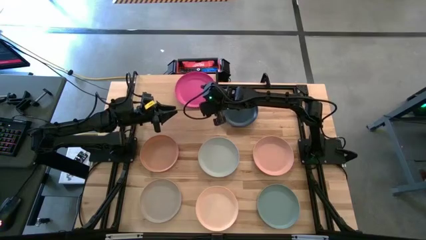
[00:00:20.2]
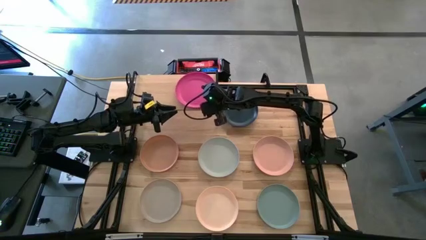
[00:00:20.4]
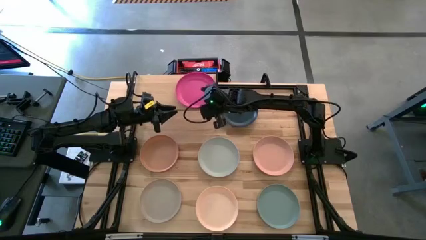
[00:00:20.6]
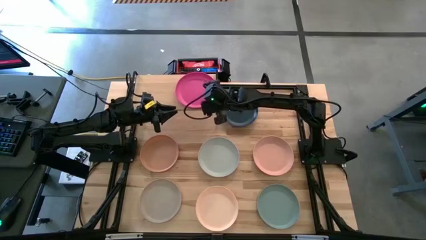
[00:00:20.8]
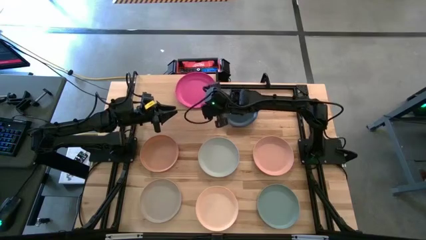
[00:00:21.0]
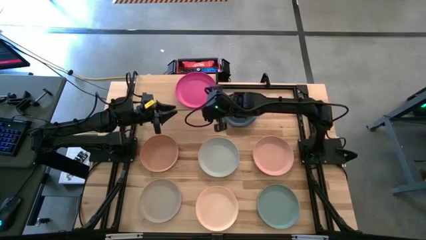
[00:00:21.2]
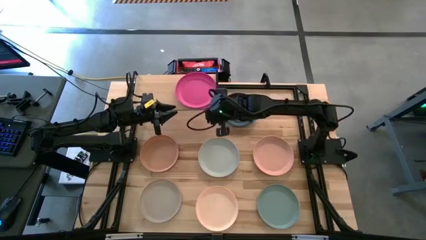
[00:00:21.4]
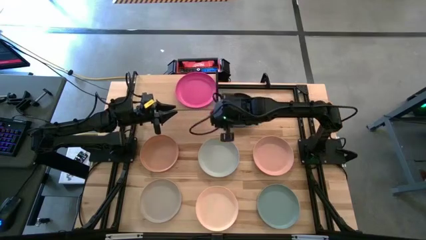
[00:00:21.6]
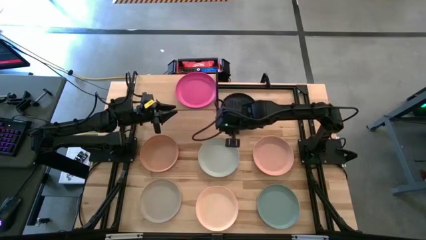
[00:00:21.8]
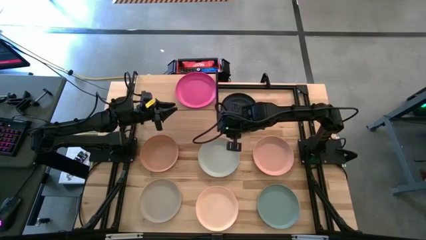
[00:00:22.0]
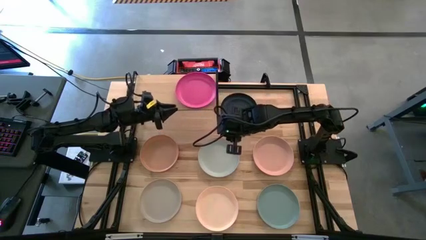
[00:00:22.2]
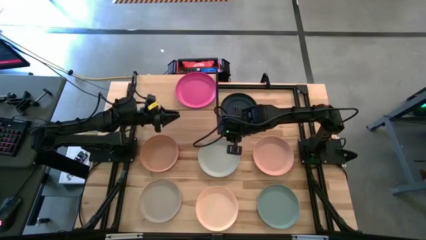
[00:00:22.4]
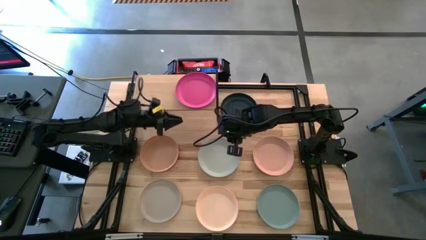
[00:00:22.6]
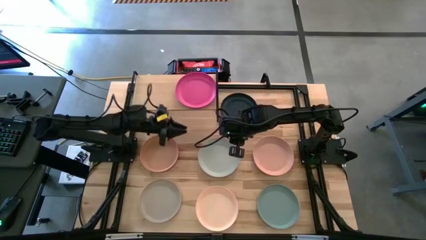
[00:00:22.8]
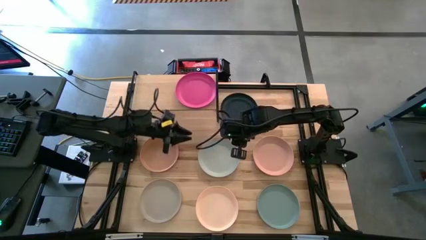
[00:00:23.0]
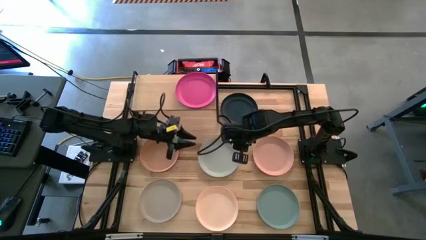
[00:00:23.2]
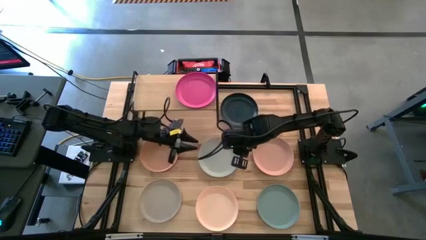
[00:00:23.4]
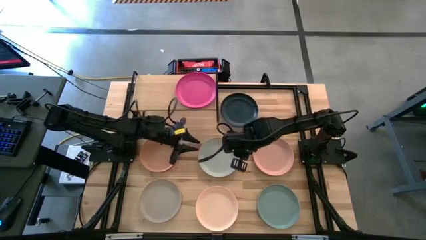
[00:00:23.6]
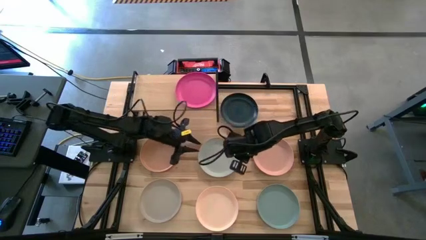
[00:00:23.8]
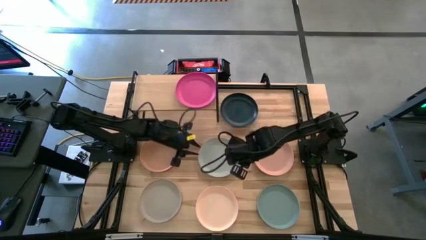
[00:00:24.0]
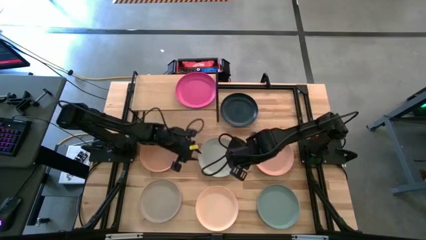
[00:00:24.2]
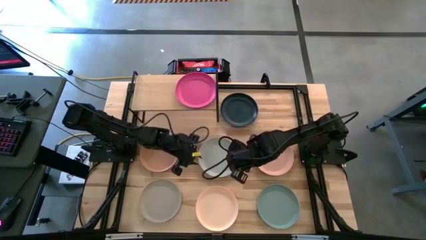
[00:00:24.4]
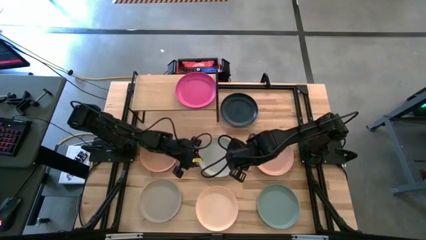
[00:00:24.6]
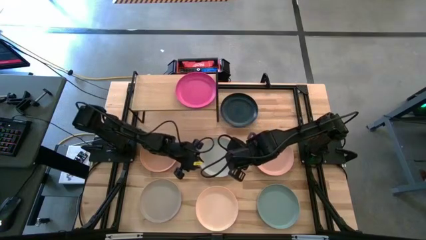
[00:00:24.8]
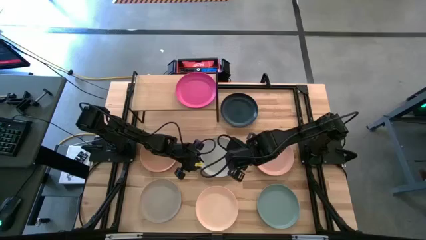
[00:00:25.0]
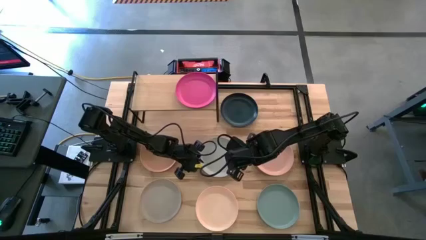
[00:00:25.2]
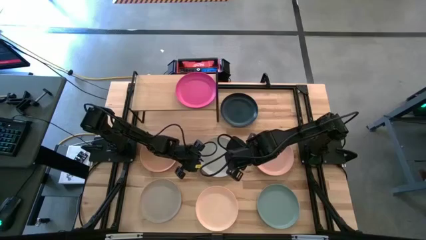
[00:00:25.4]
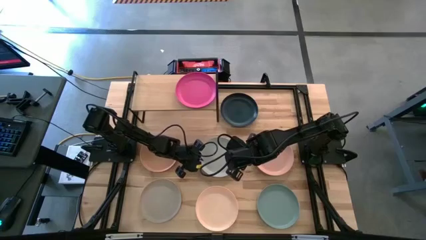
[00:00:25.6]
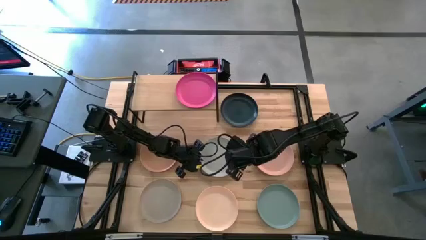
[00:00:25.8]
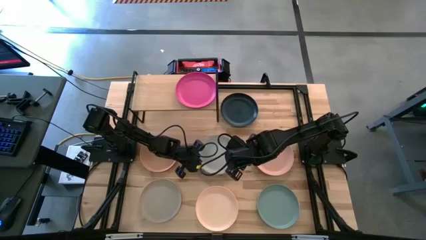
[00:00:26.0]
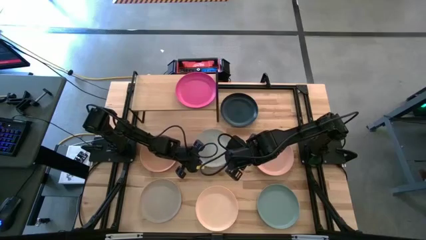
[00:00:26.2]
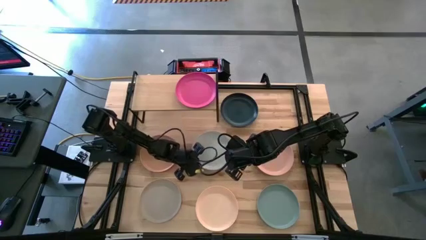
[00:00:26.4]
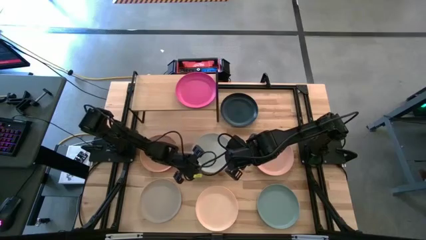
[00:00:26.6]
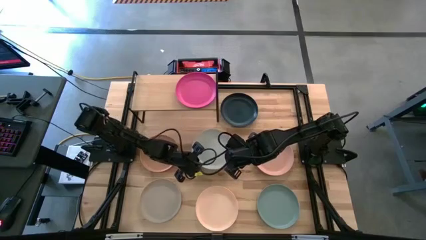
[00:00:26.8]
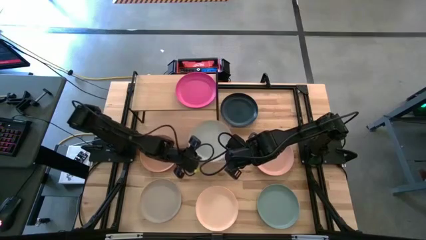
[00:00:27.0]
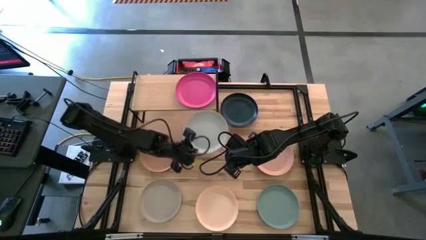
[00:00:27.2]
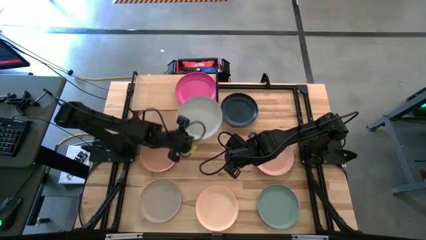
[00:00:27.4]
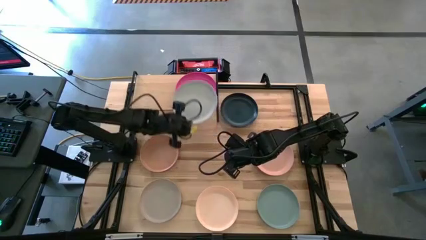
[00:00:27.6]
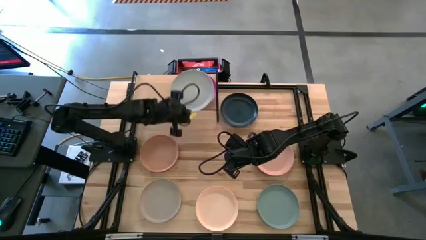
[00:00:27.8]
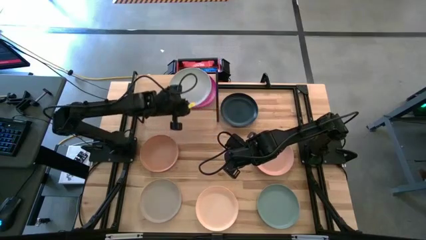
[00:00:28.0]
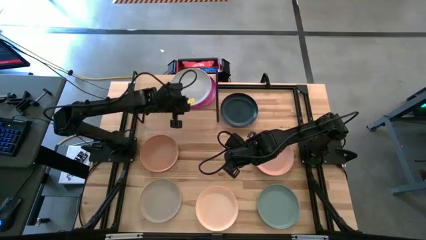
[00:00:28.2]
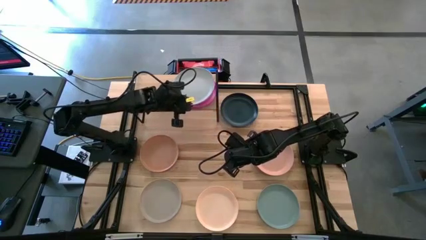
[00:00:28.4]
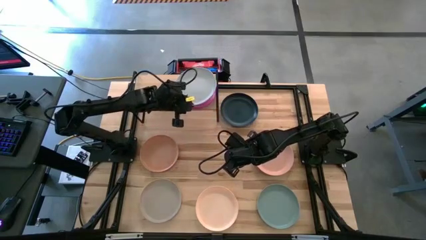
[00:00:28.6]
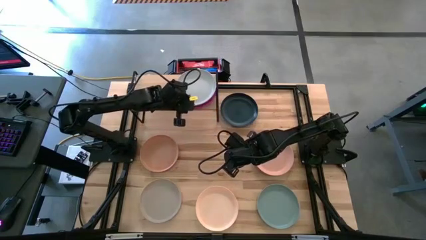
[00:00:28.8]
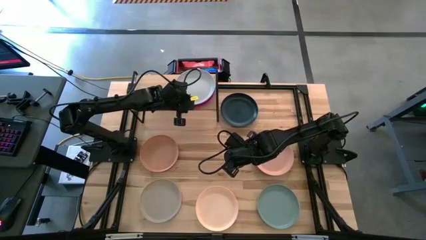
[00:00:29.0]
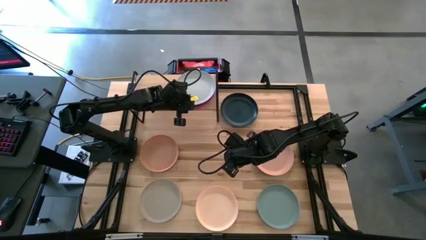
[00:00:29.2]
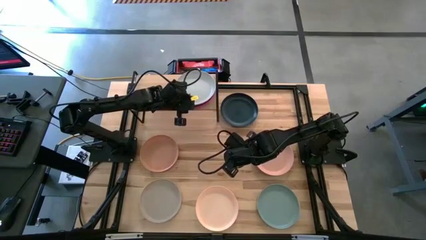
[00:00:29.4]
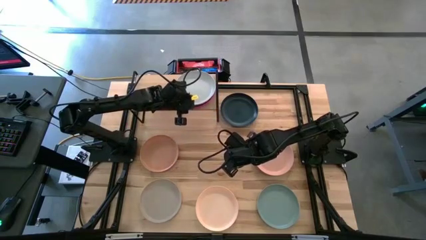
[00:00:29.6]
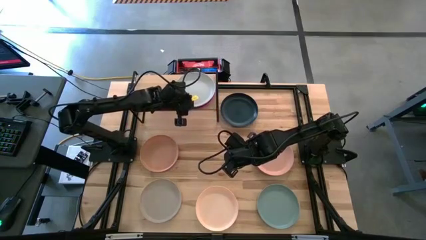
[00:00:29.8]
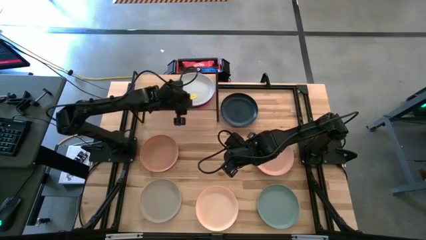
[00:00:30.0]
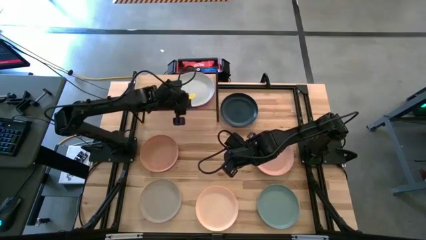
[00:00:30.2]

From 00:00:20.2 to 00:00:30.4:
Task: Place and stack plates onto a shelf
Stack the top gray plate on top of the pink plate on the shelf
